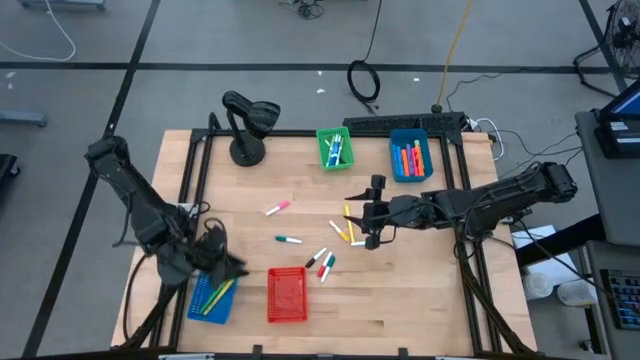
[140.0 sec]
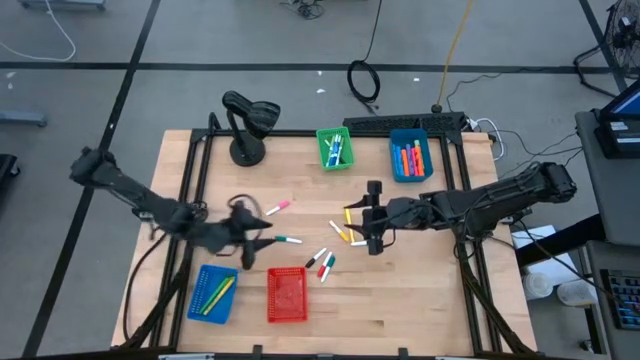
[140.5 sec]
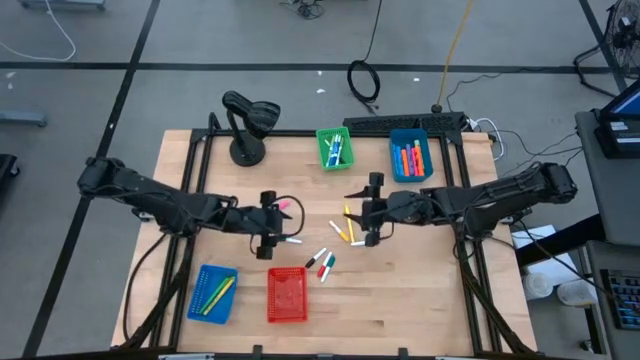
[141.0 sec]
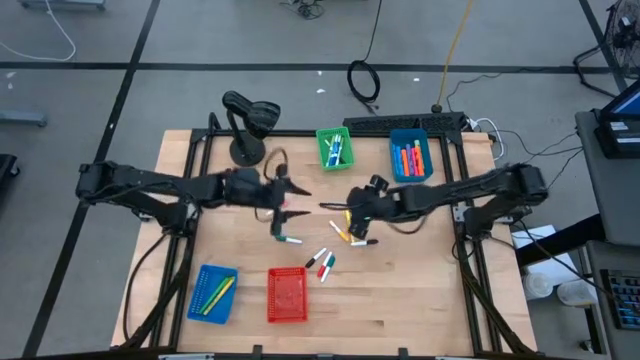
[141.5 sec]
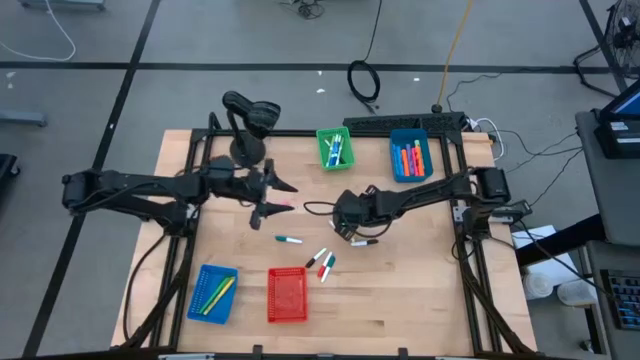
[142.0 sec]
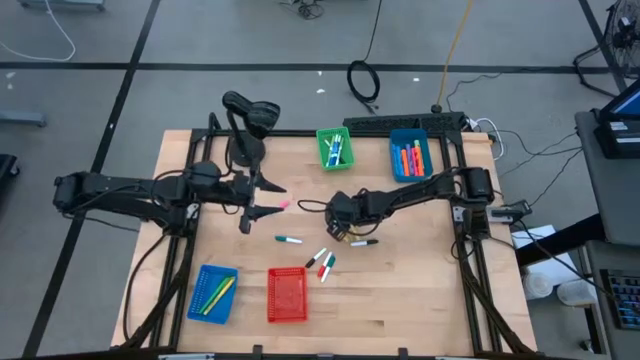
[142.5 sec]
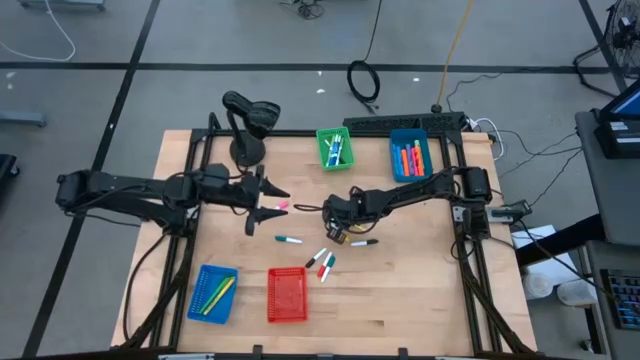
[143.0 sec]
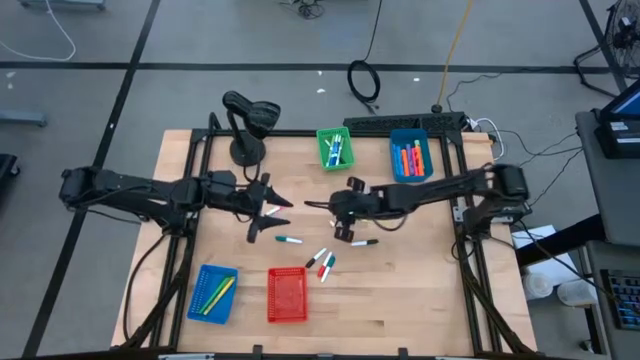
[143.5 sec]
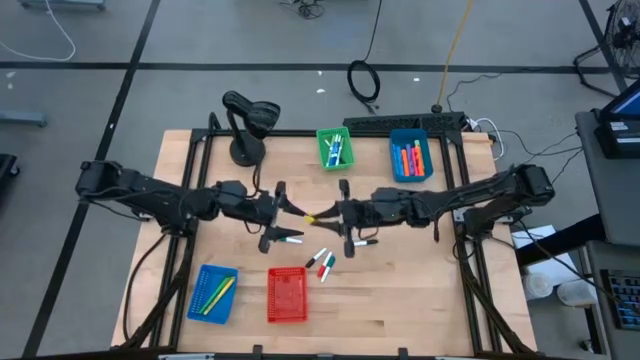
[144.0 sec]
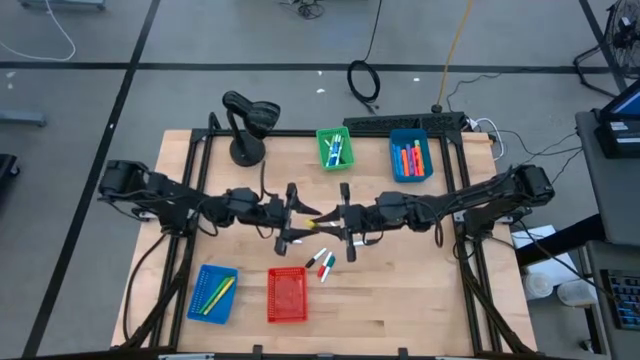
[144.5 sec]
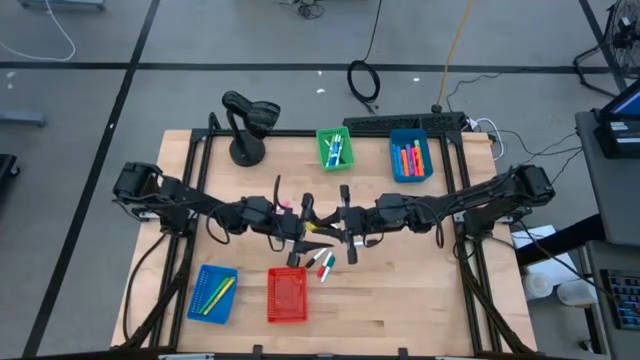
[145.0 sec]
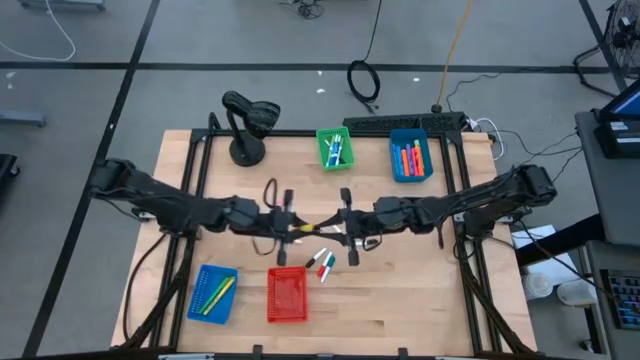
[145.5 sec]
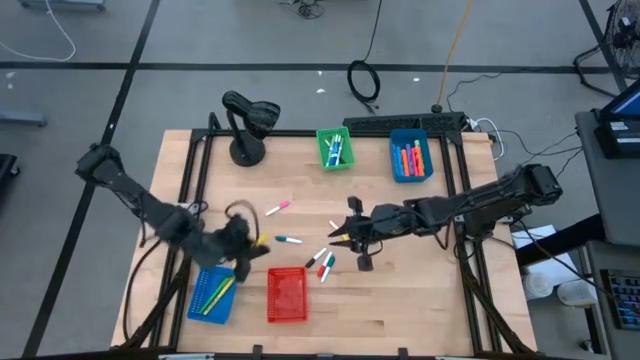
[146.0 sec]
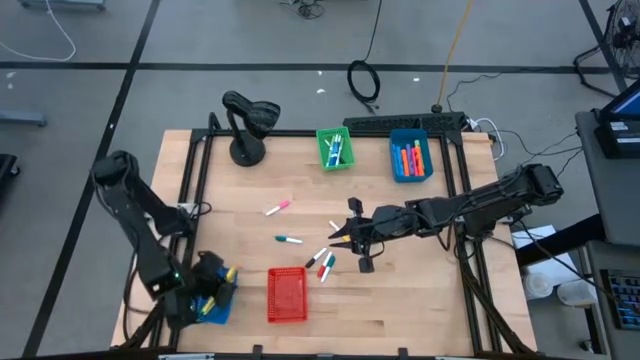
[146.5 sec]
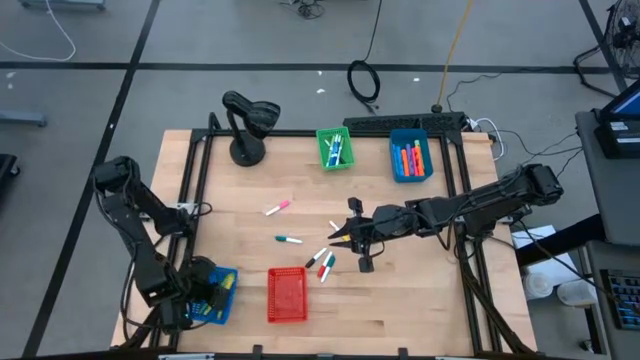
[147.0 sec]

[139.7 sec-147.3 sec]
Task: Pick & Place Markers
Put the yellow highlighter pen into the blue bin

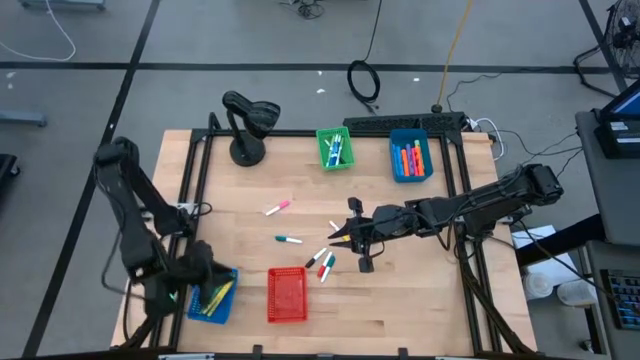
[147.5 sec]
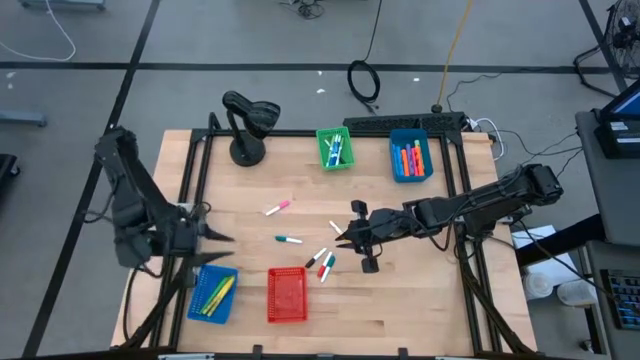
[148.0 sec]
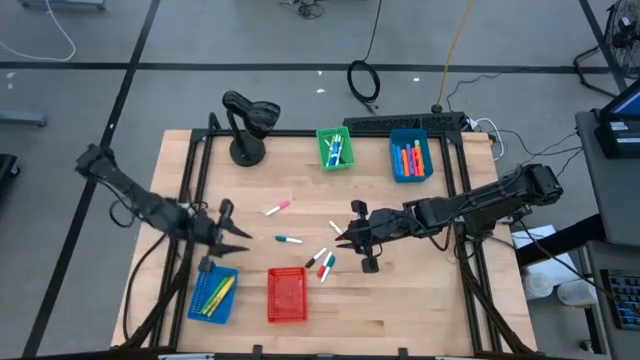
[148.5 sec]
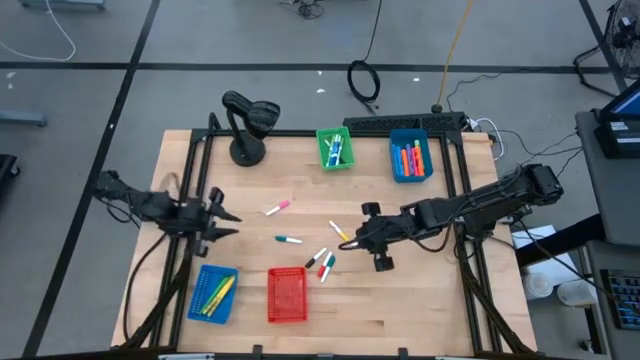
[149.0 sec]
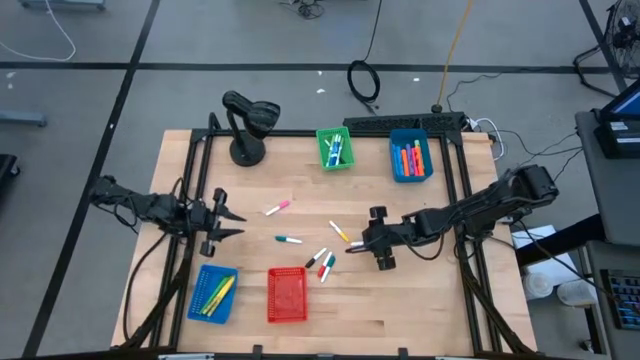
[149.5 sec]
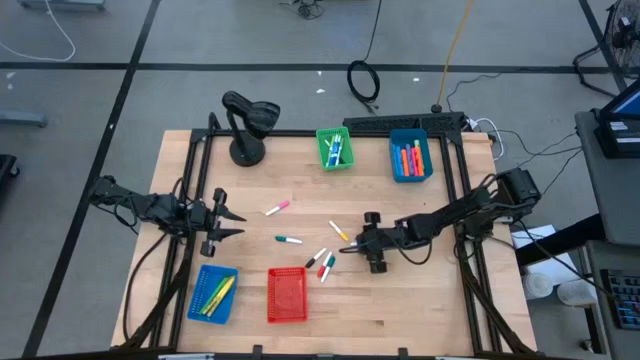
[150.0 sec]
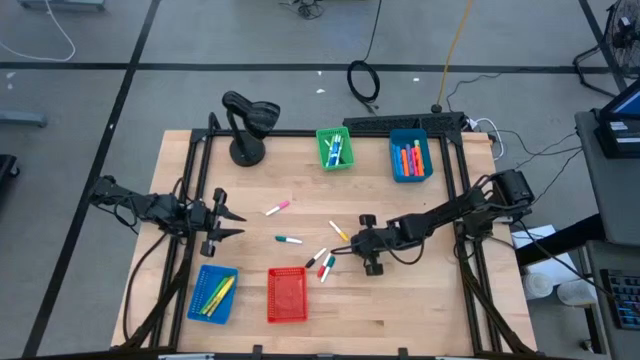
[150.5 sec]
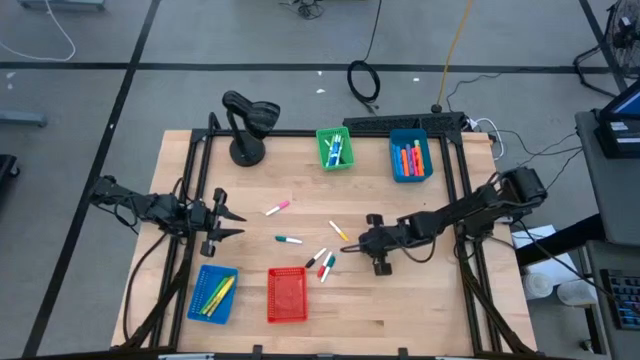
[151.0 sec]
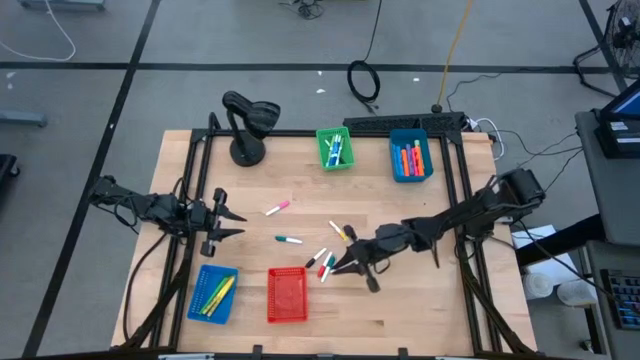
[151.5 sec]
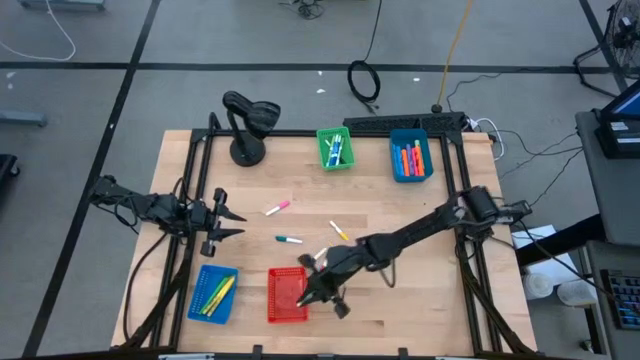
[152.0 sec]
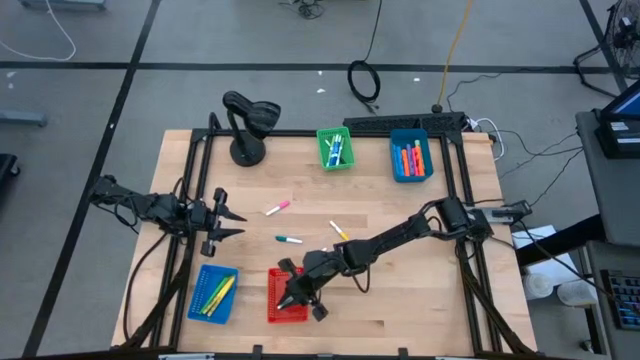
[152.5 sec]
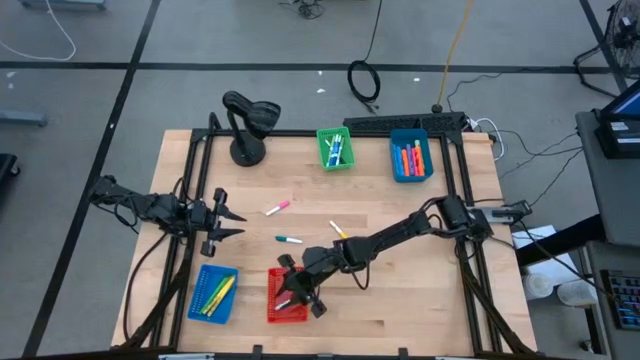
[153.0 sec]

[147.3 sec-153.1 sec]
Put the right black mini marker into the red bin

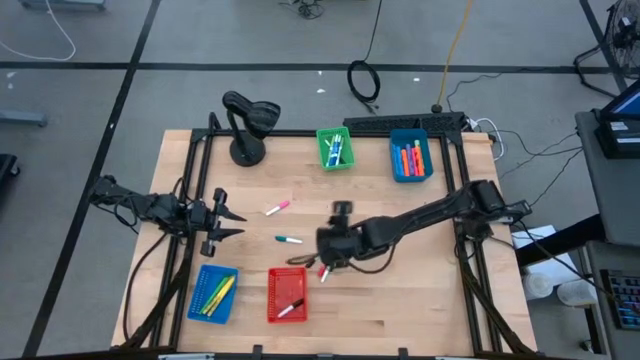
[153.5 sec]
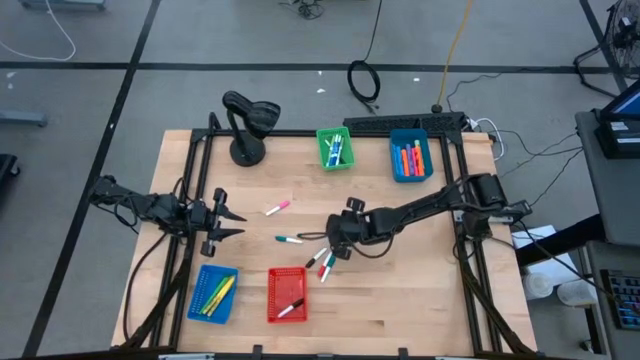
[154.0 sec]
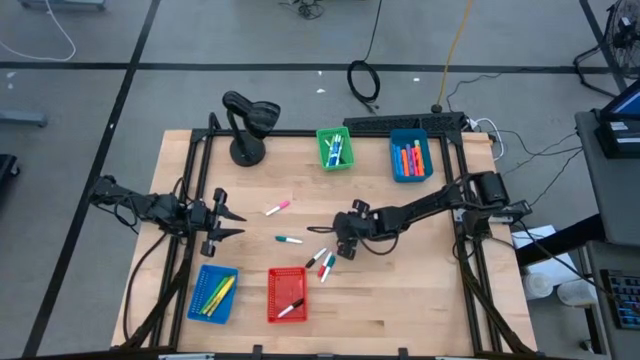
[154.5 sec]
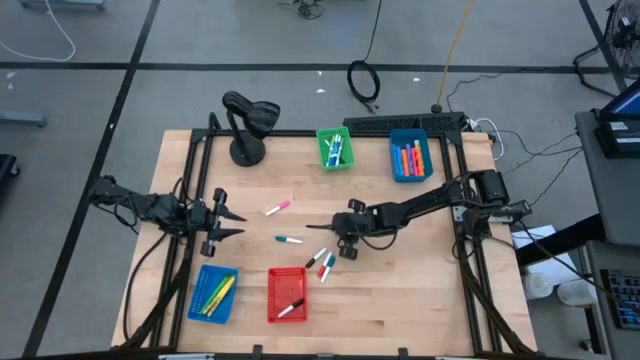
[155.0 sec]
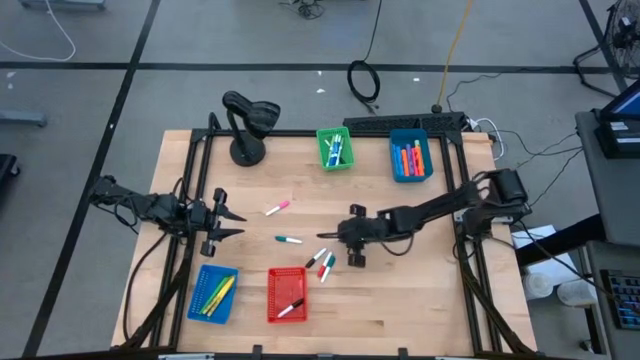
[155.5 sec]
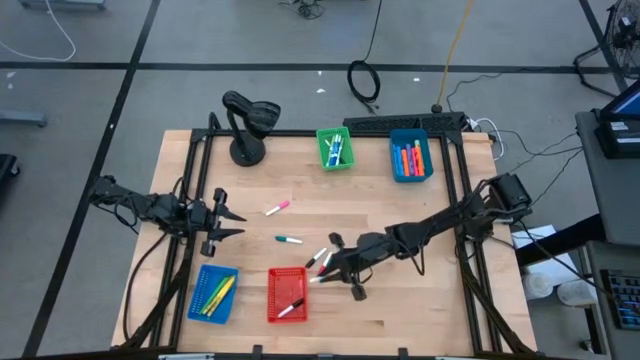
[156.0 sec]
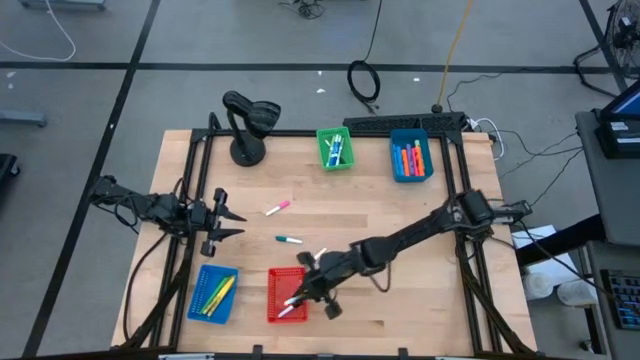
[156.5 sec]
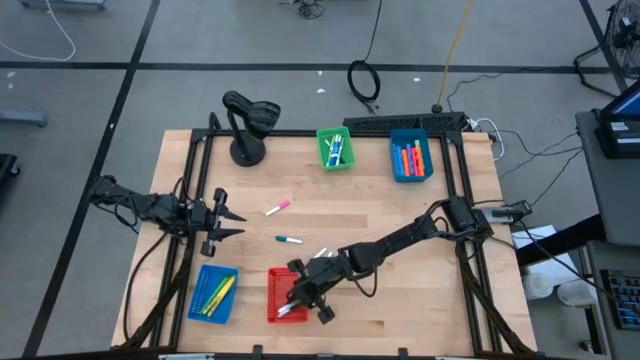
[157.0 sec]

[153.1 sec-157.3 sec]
Put the yellow mini marker into the red bin

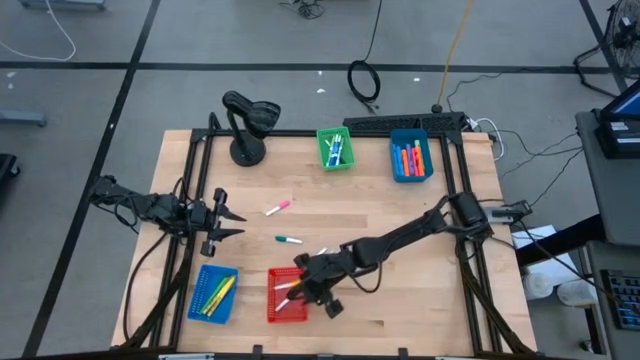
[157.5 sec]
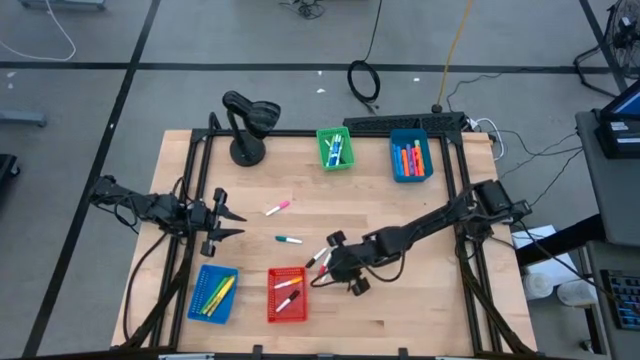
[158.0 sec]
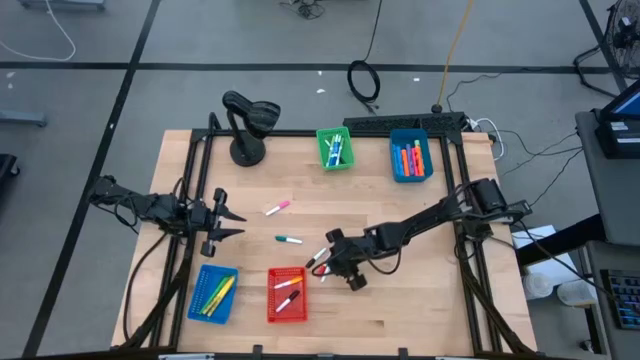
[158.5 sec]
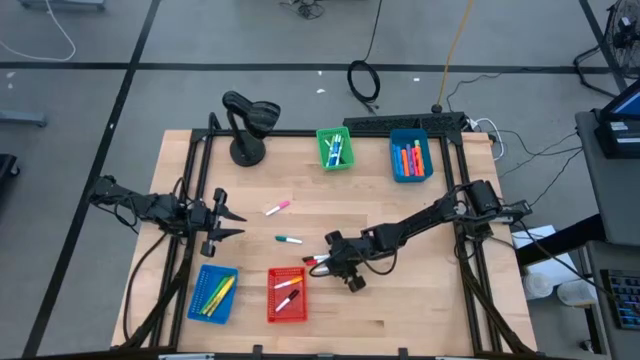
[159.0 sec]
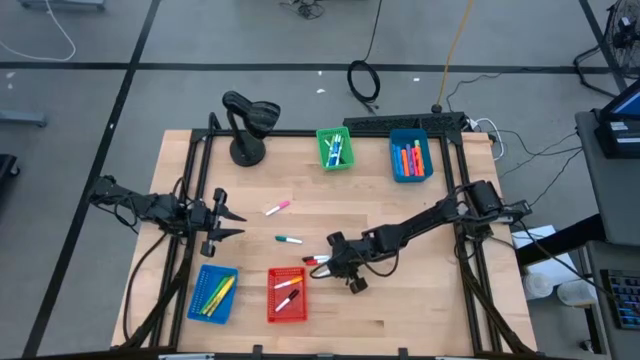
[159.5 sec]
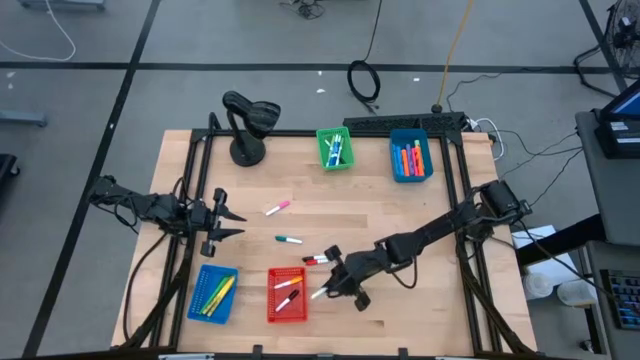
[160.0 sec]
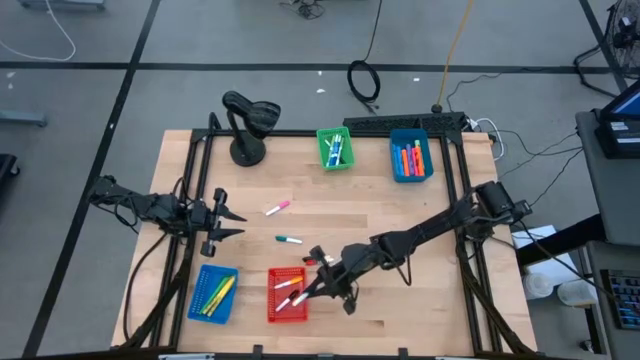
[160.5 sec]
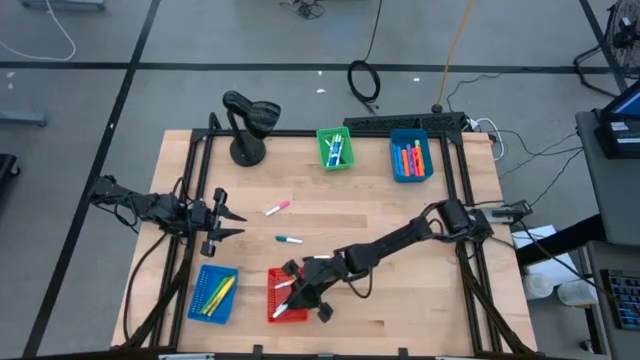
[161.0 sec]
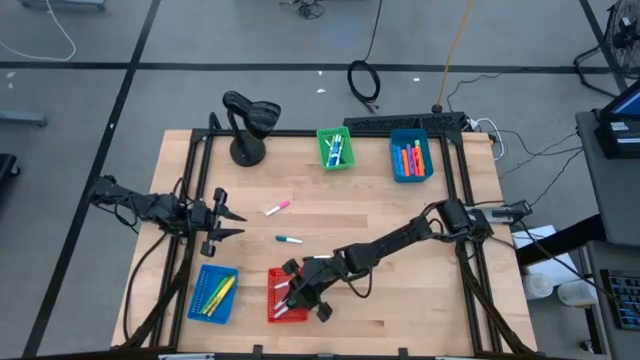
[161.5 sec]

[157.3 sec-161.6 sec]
Put the bottom green mini marker into the red bin
